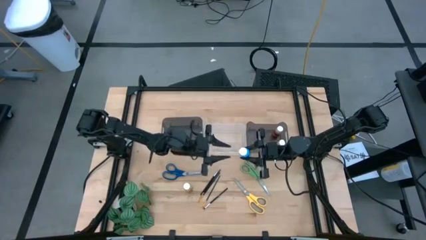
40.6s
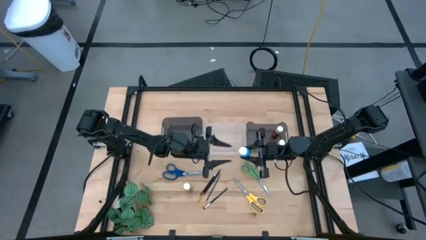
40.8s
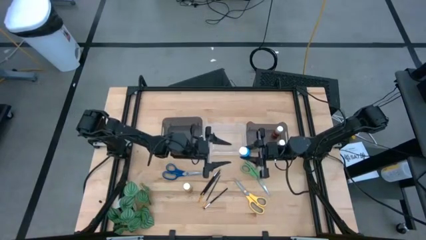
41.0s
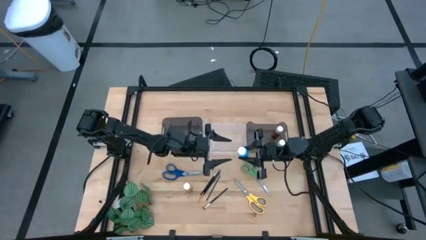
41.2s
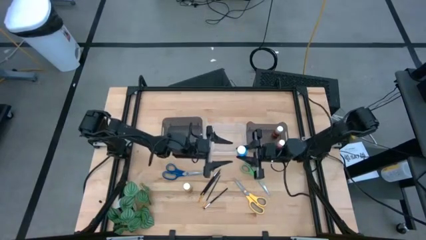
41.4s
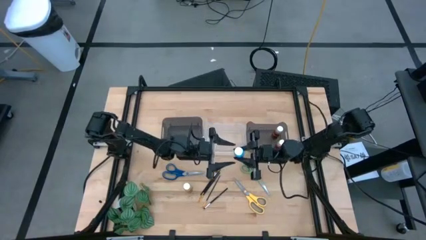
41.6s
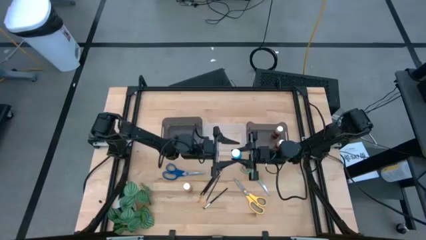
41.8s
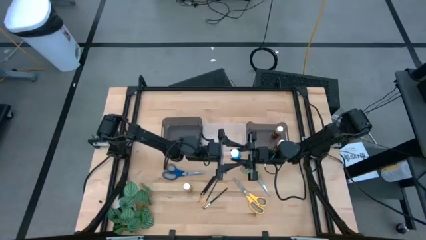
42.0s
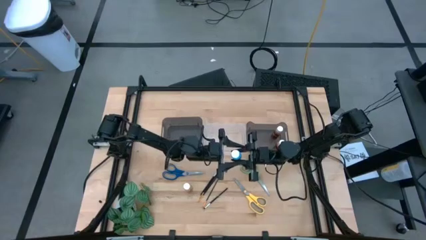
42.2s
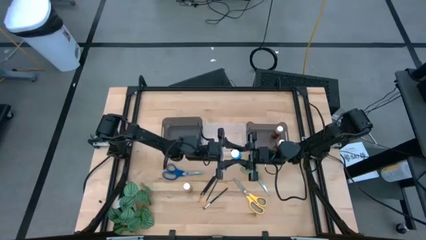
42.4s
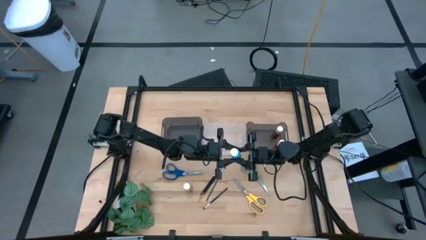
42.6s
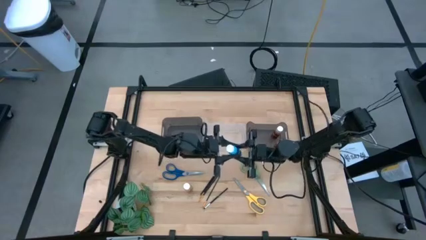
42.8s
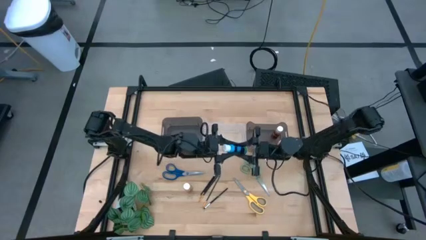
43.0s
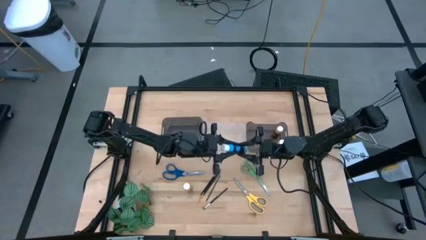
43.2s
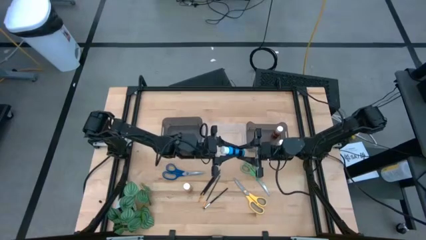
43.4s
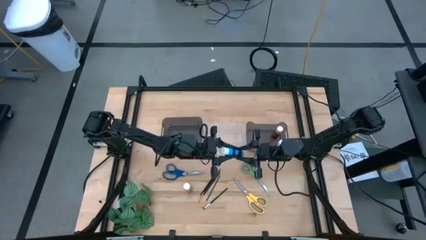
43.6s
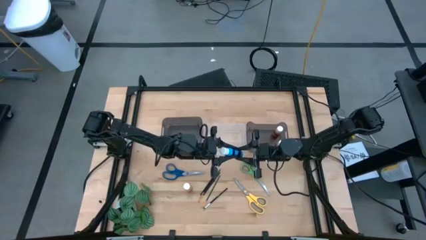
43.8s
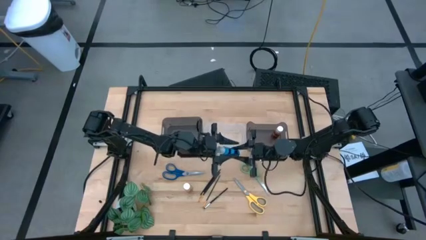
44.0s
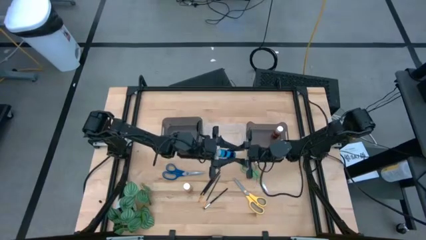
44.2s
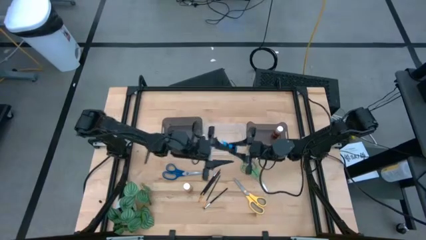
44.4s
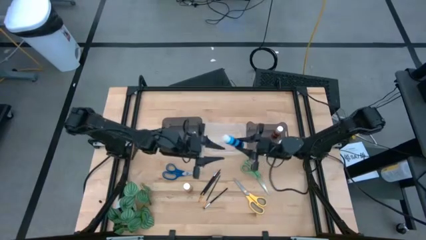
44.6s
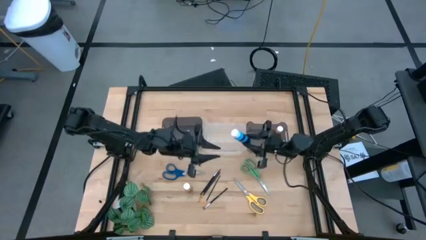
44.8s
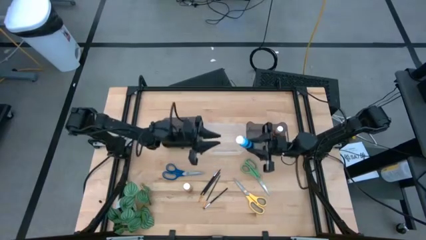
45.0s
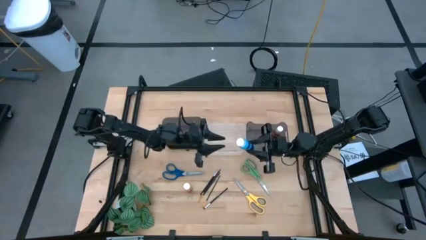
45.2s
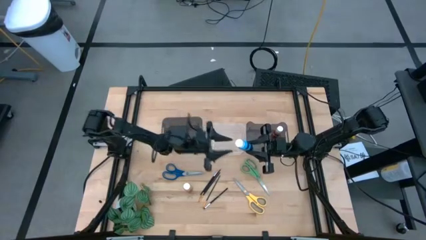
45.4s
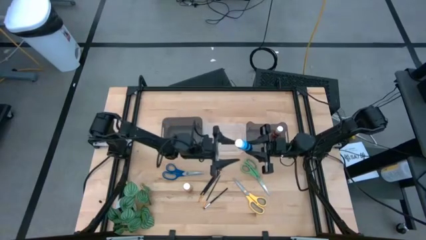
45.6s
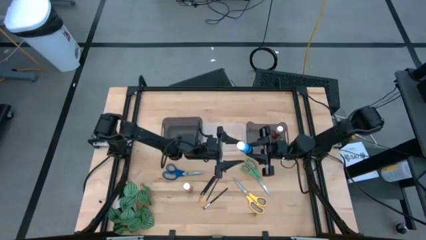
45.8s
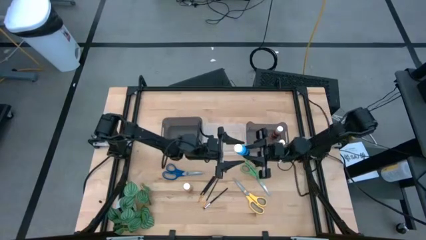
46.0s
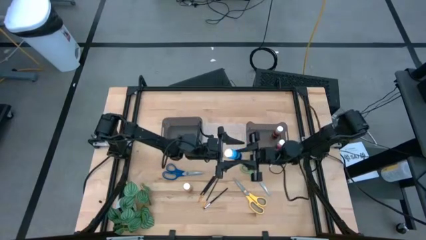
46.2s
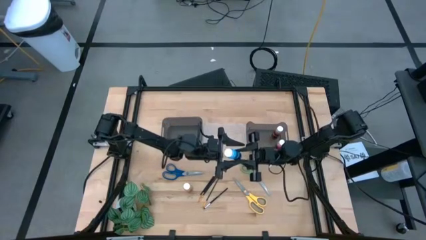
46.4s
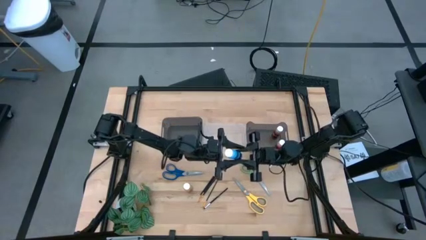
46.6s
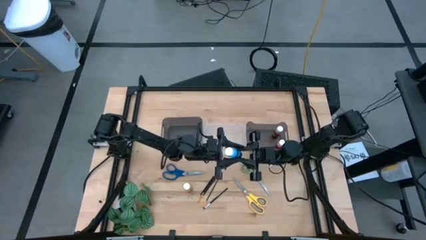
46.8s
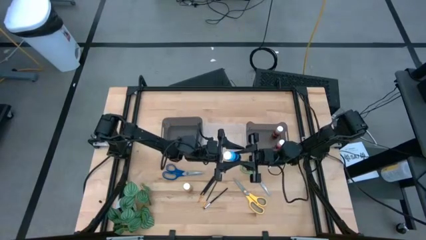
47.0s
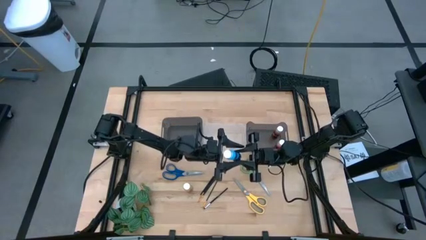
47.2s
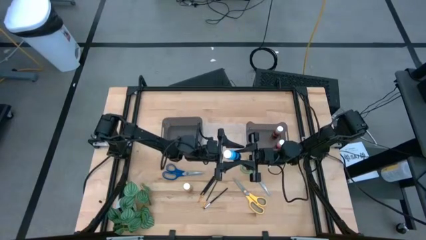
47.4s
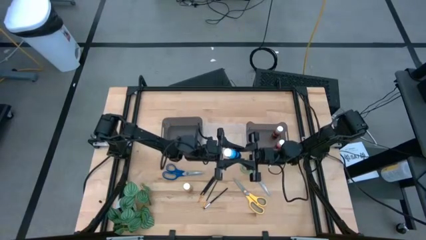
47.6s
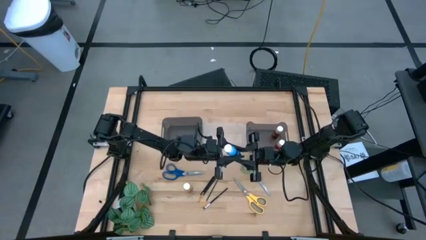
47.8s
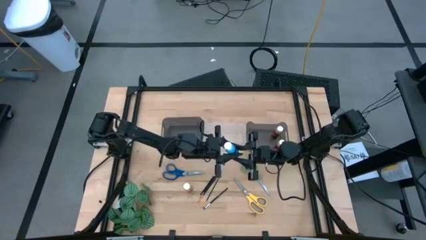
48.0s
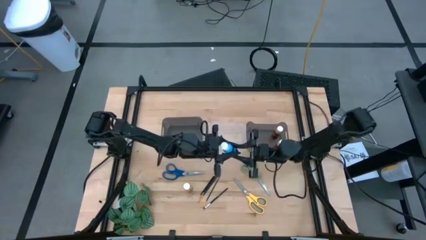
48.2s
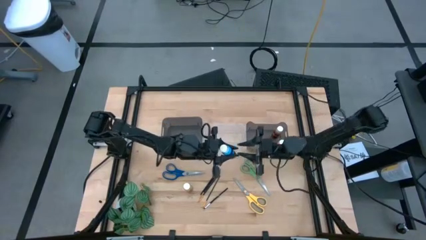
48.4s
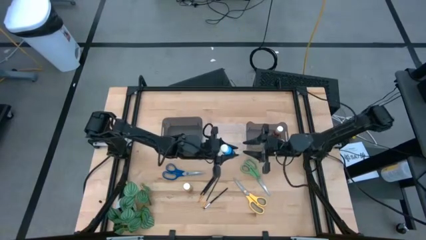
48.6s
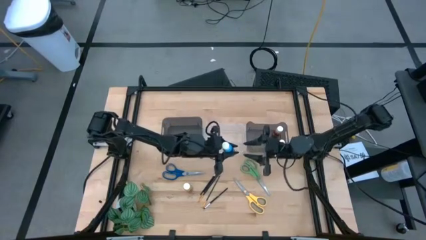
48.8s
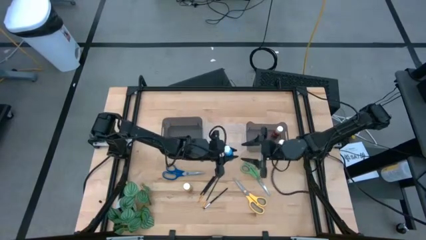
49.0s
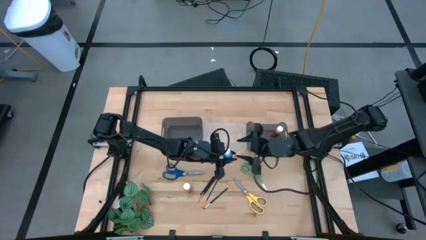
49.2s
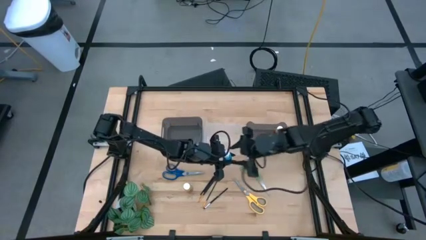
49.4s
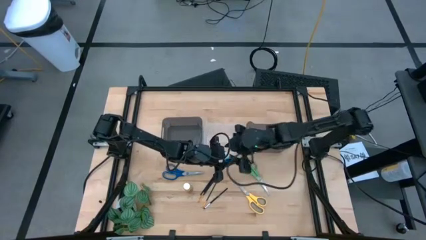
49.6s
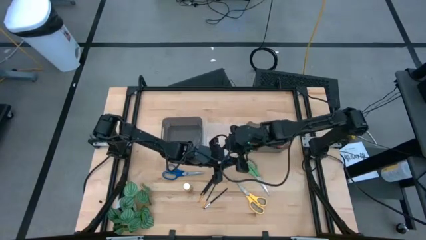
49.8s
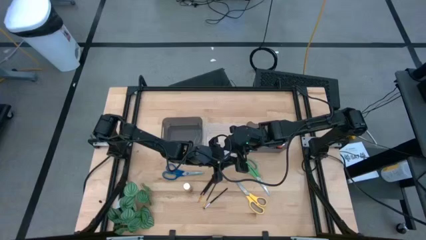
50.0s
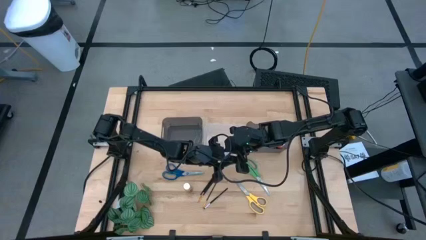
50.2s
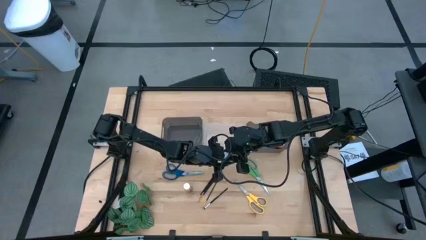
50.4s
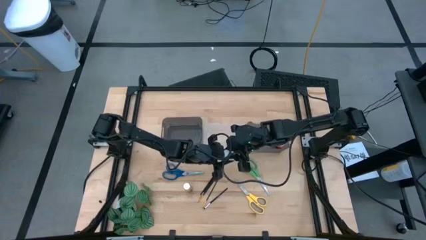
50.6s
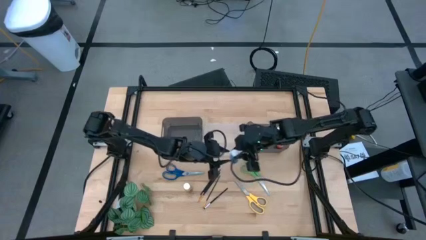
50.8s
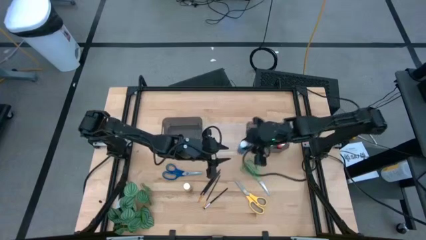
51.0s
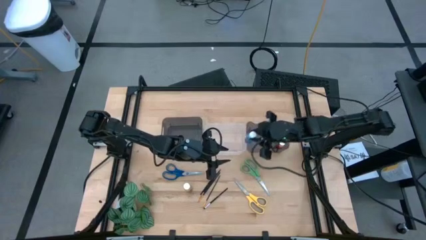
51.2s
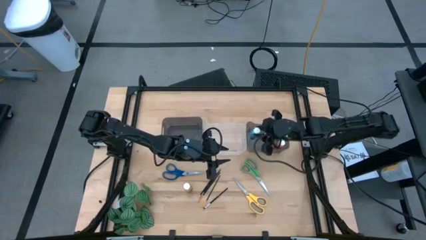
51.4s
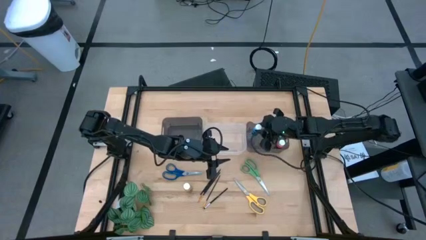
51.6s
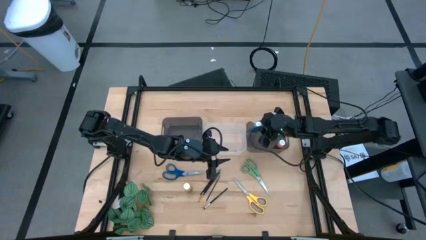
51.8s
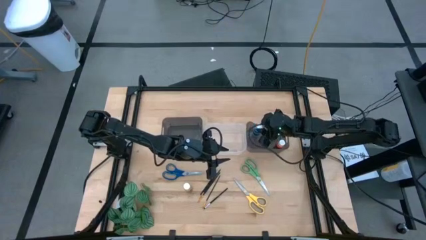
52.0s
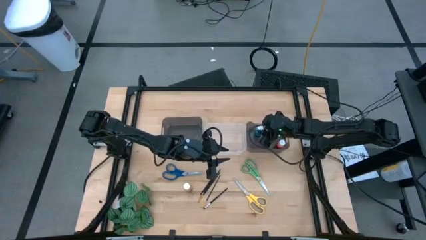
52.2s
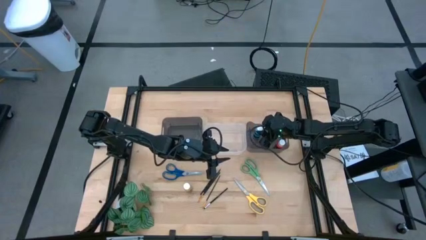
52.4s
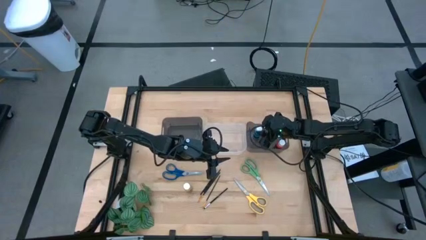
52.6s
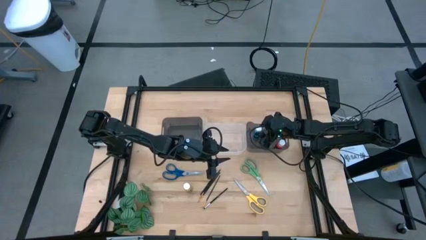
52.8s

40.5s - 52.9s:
Task: Pick & Place Paint Supplies
Put the blue paint bottle into the right black bin
